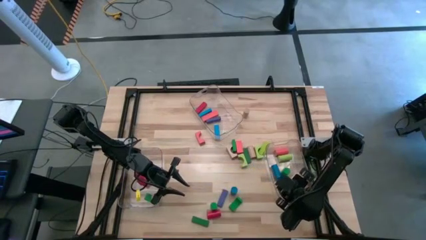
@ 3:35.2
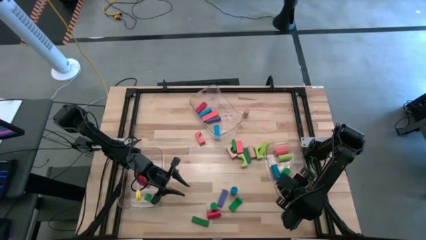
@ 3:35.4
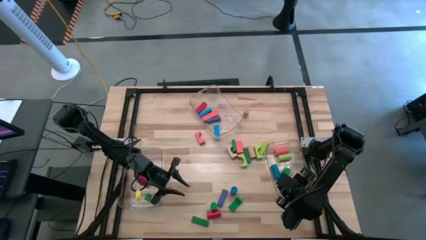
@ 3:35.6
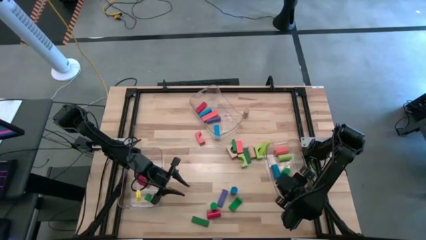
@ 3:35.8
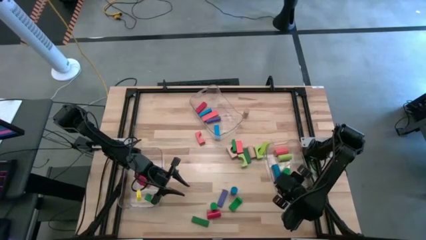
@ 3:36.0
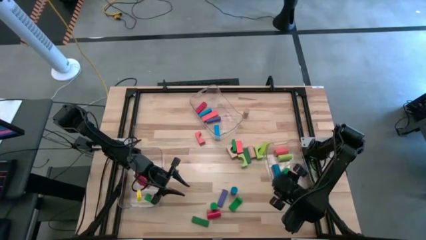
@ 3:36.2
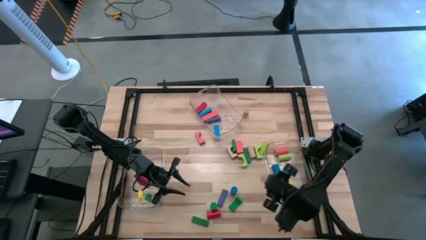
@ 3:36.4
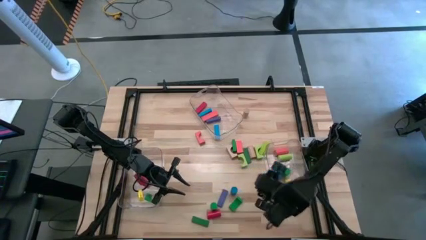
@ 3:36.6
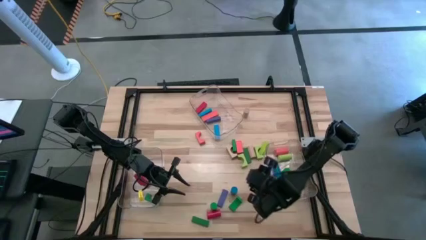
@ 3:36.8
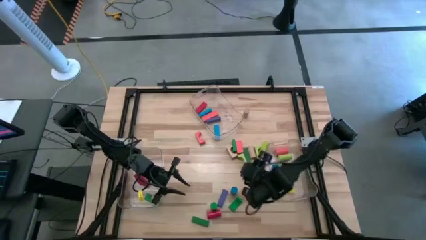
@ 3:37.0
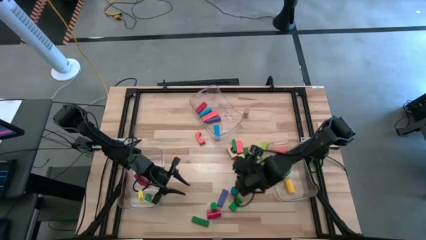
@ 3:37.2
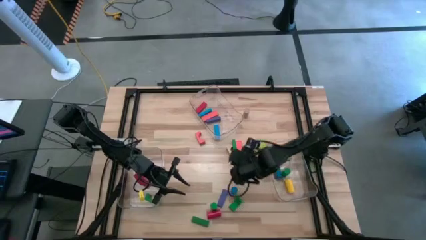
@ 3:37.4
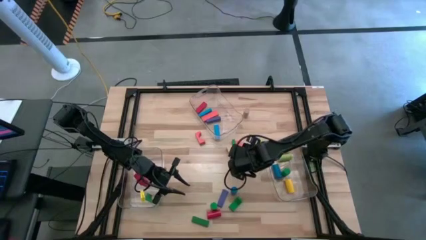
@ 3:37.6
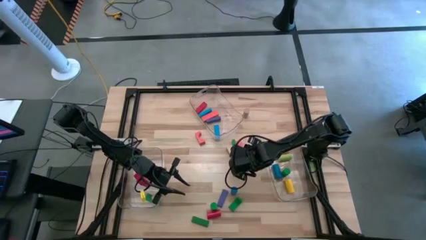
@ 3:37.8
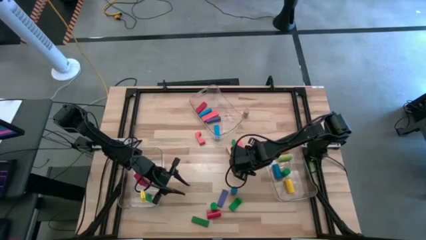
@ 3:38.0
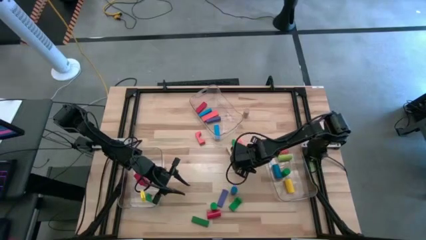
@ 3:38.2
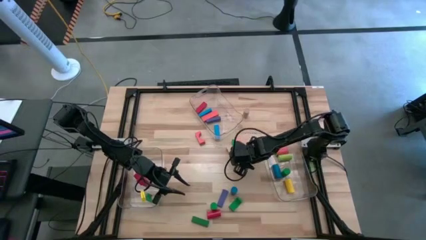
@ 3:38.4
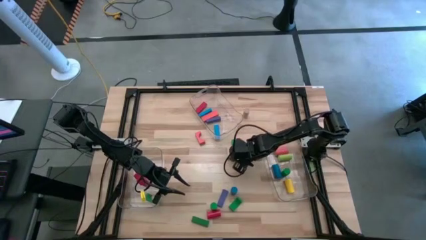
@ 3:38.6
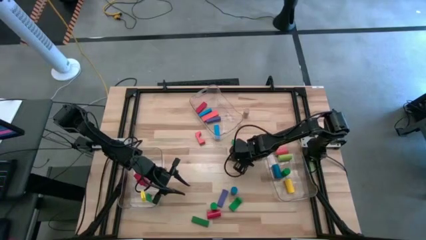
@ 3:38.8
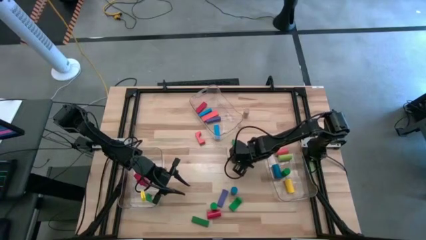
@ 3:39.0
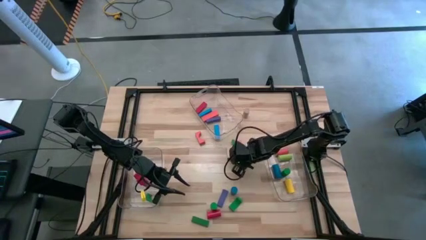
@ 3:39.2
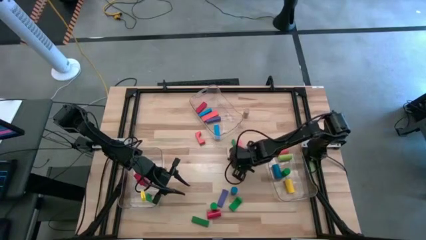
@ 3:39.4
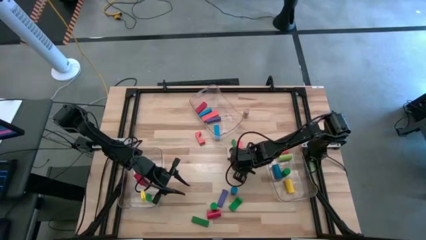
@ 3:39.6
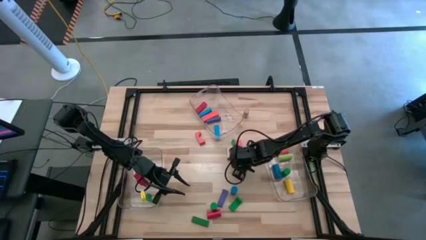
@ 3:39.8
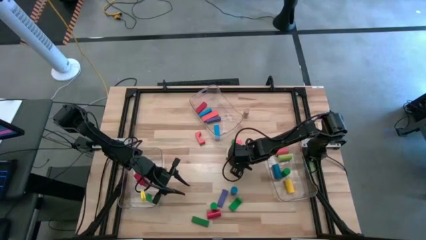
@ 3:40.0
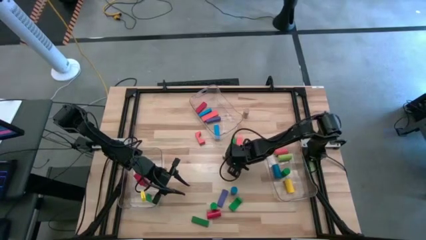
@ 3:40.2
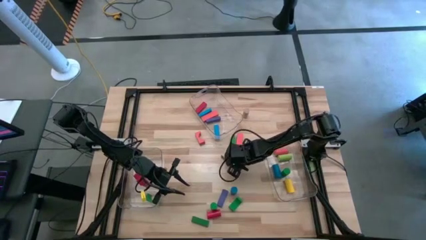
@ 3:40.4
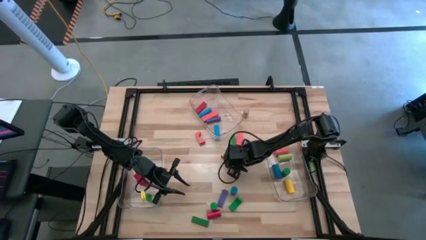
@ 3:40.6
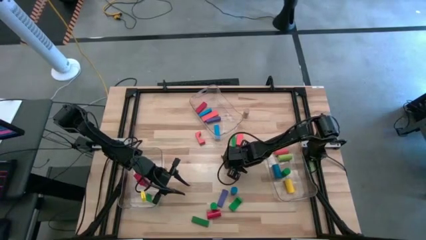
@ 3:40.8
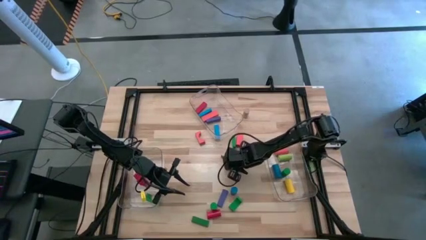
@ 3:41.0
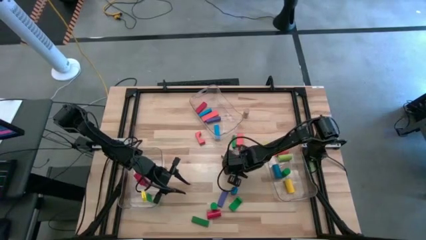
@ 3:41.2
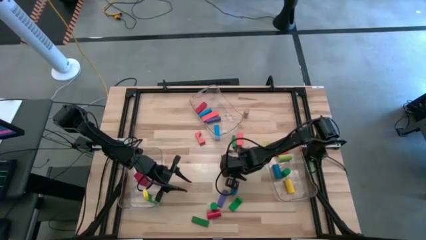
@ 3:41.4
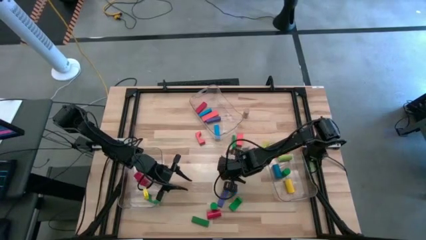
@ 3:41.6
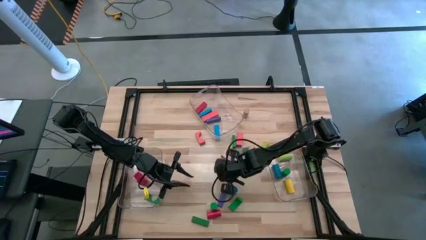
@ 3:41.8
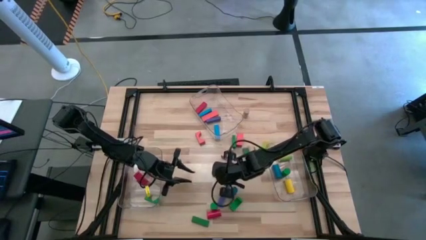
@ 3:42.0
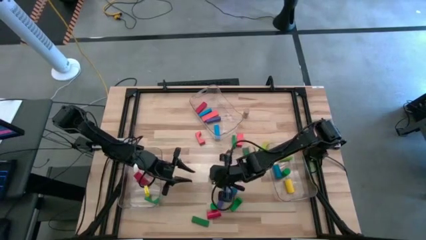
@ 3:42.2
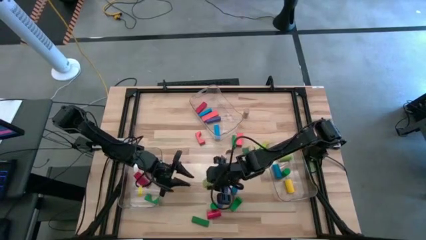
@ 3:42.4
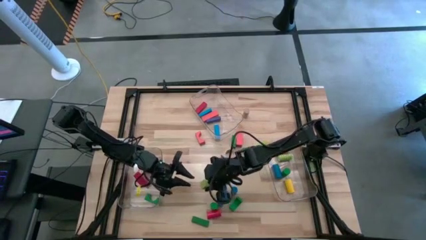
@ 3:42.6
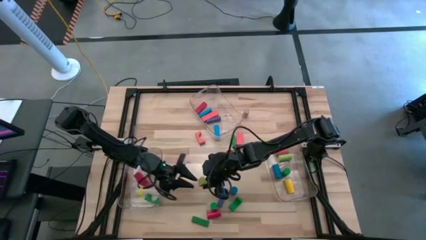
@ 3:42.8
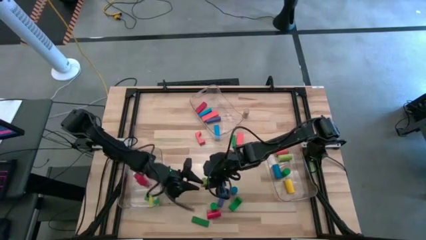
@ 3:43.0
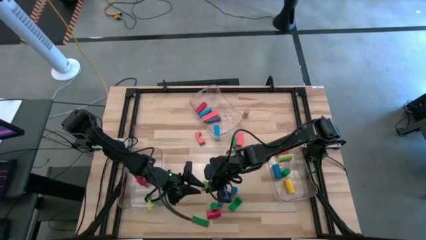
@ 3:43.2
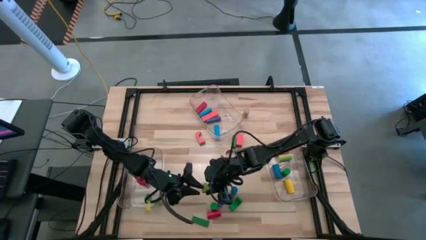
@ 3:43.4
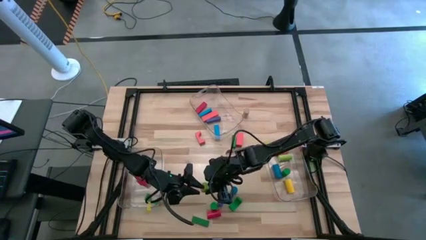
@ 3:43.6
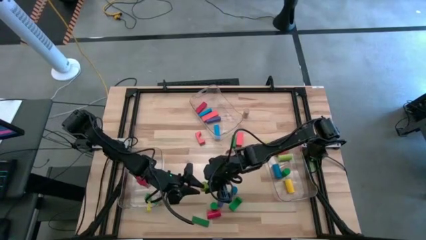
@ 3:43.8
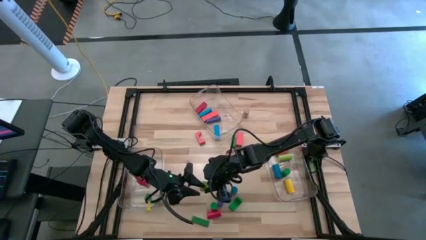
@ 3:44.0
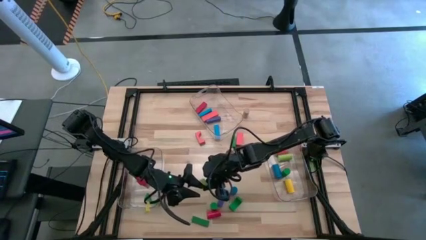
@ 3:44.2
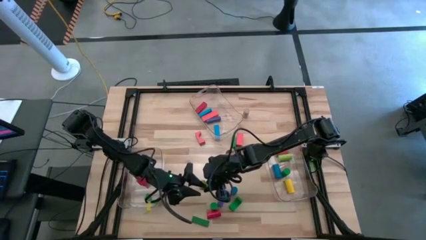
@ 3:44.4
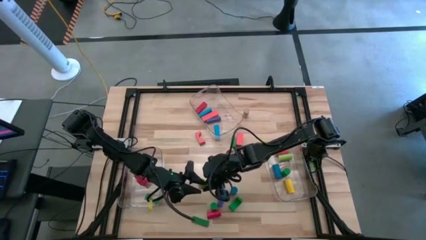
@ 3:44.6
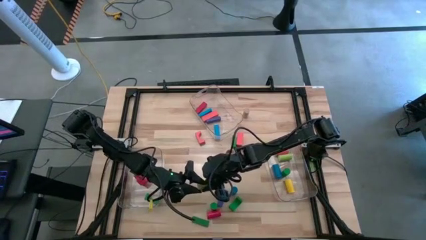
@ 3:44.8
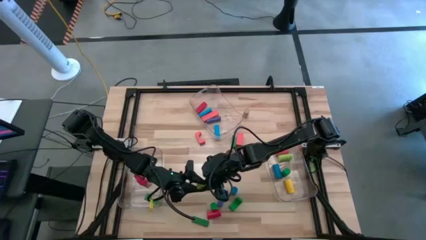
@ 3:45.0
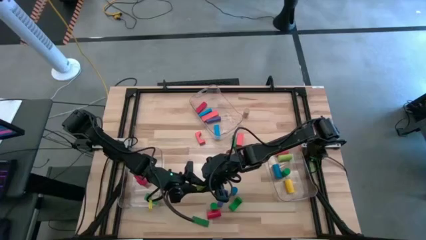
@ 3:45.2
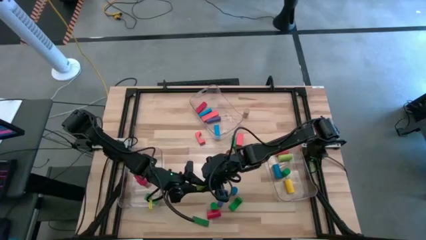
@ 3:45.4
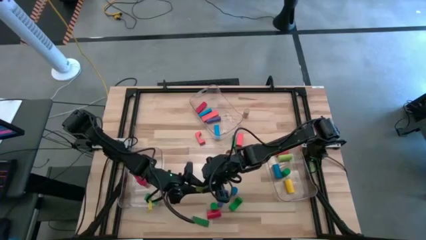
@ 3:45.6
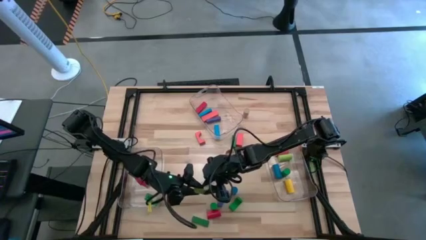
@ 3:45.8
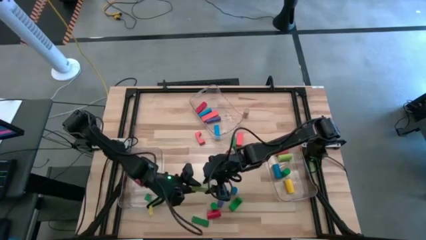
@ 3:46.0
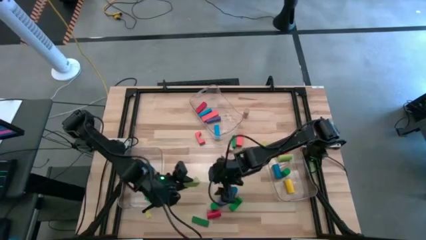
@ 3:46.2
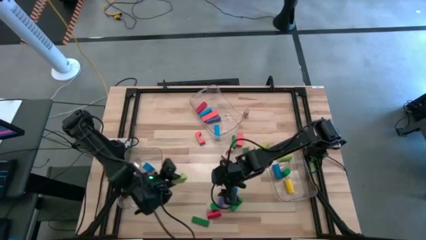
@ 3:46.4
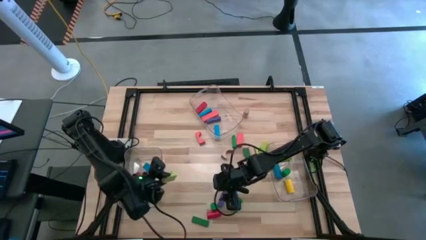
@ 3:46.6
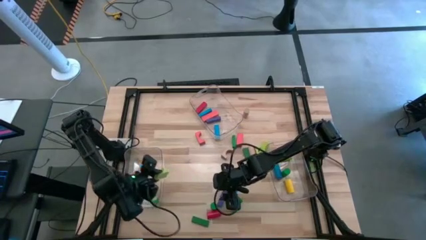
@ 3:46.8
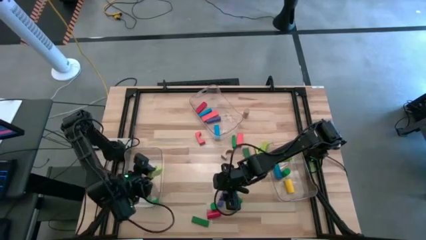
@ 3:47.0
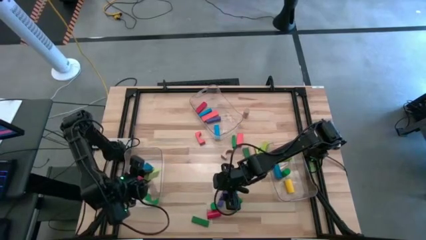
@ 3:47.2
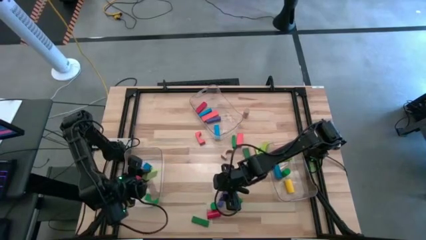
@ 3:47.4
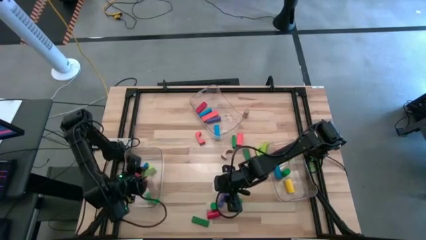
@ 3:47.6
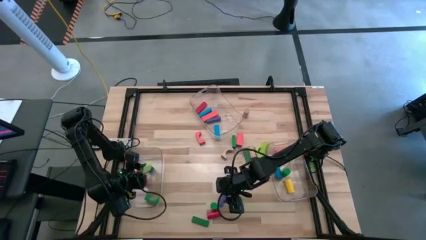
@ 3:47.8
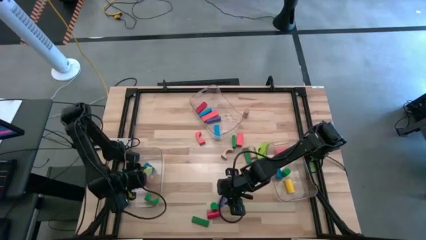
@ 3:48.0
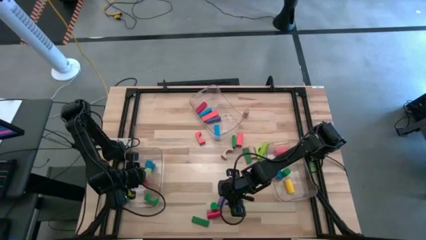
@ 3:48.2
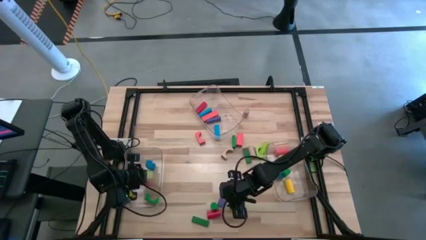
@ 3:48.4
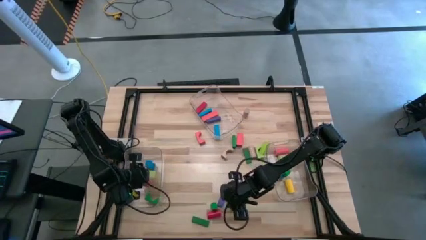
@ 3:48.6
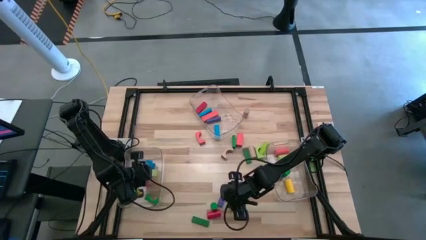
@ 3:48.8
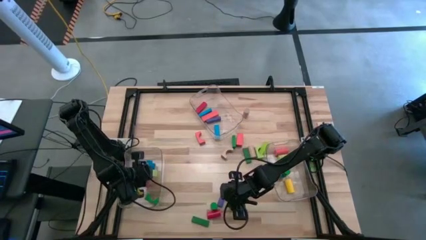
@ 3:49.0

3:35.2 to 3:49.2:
Task: Sort blocks by size
Put the light green arc block into the left transparent bin
